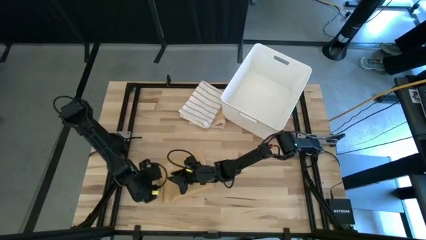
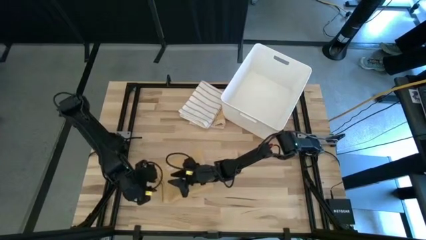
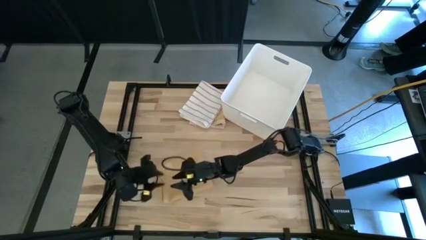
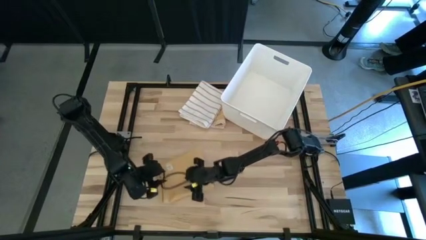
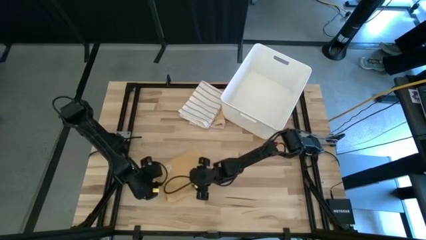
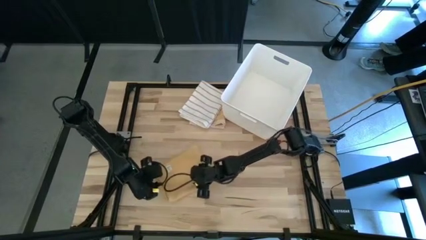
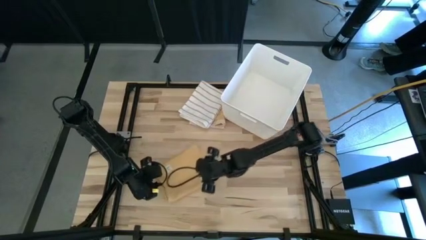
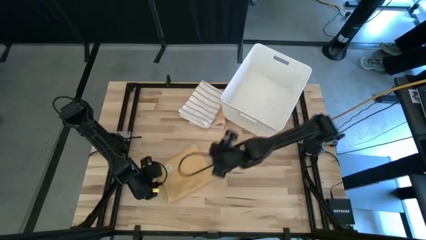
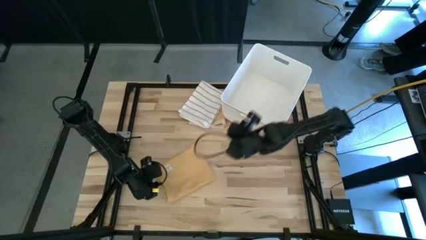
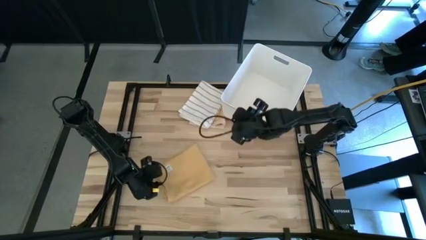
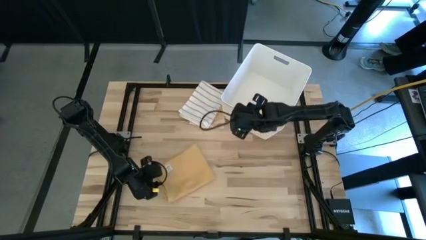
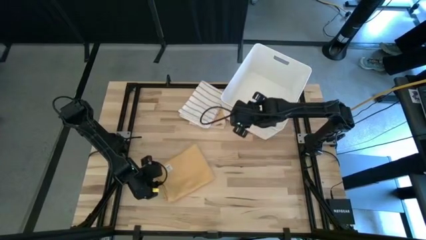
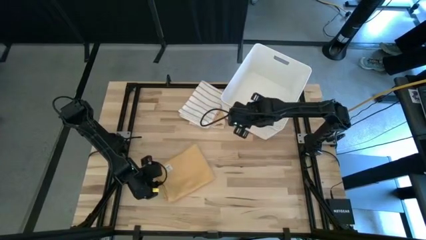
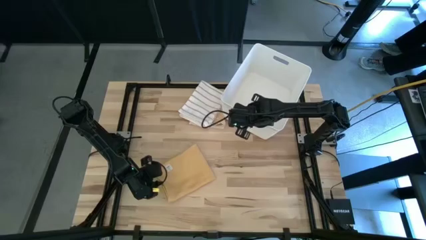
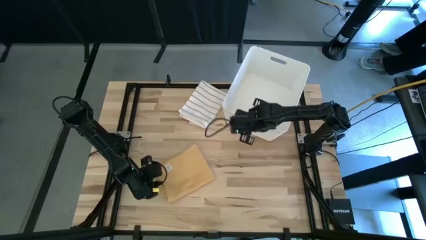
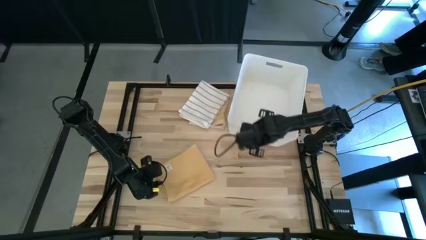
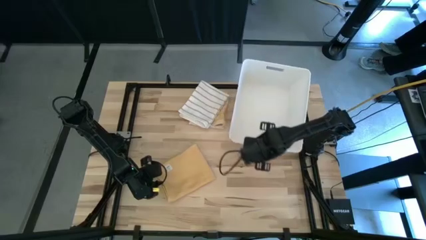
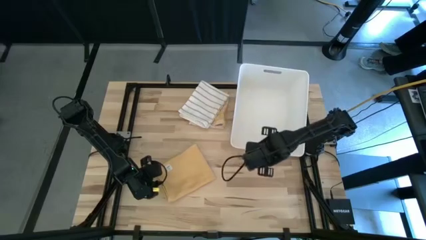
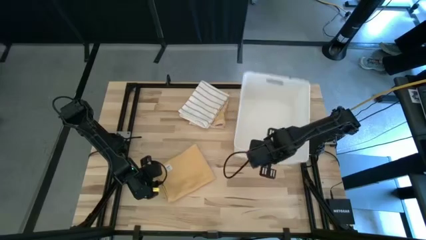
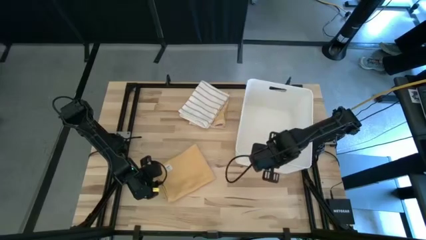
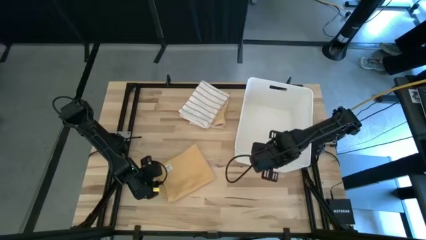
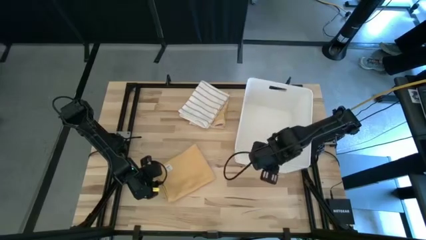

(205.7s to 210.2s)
Task: Fold towel
Move the white laundry organizer to the right of the table

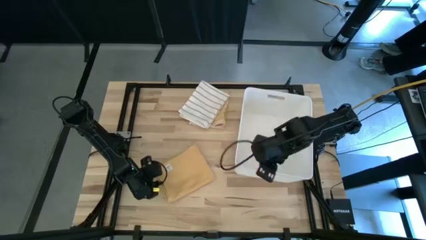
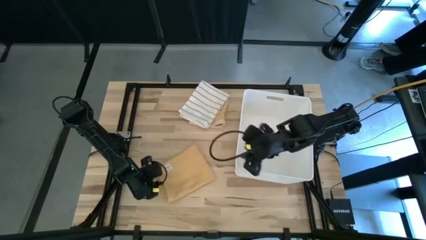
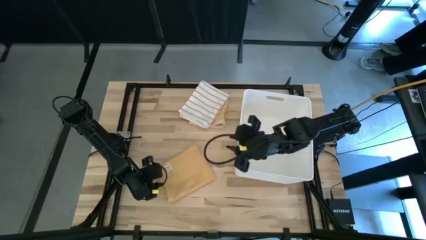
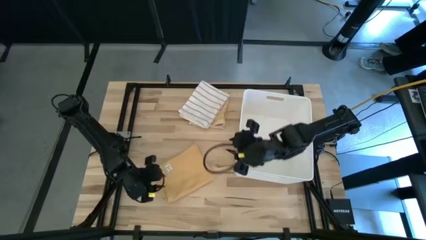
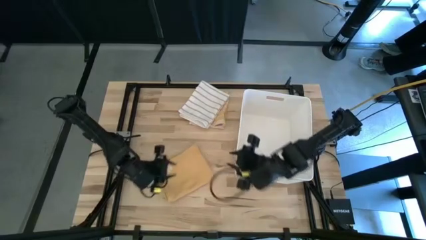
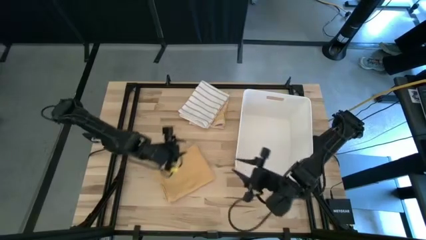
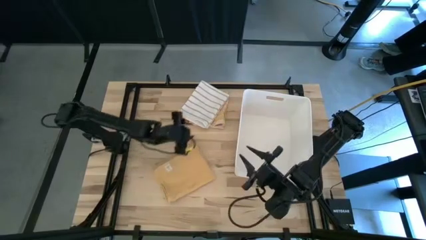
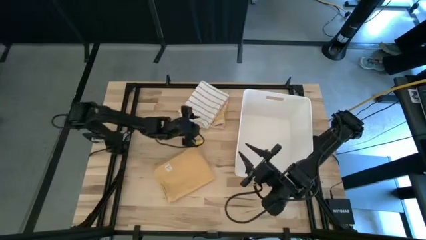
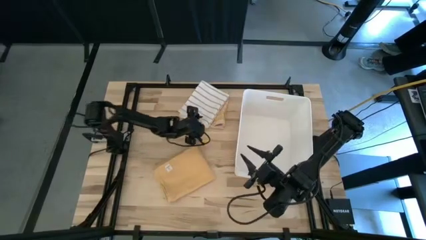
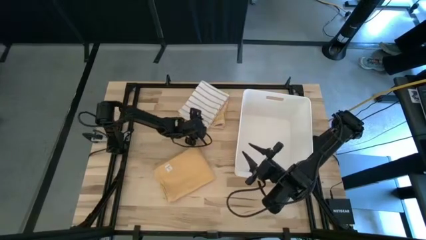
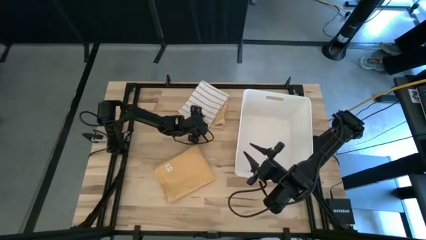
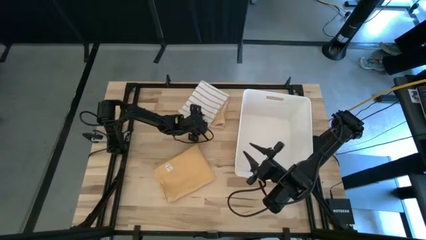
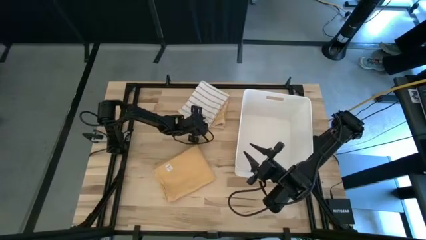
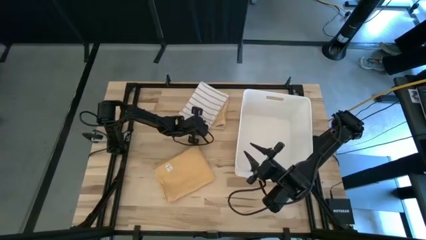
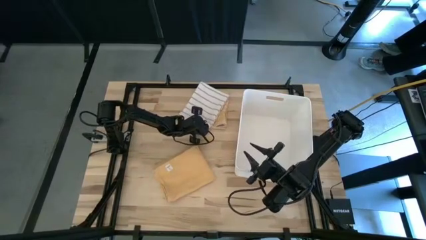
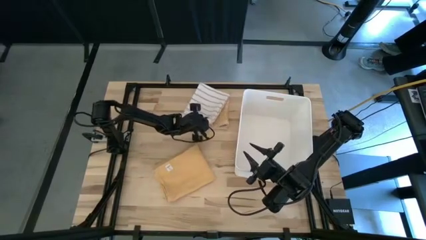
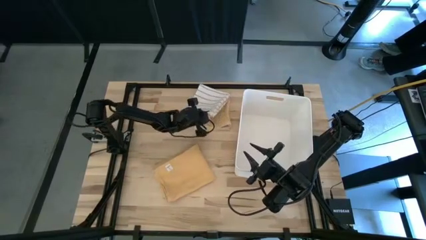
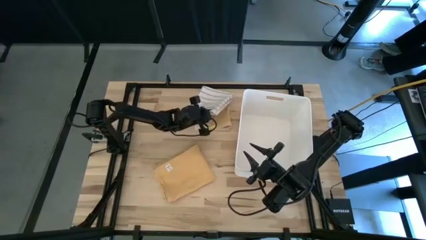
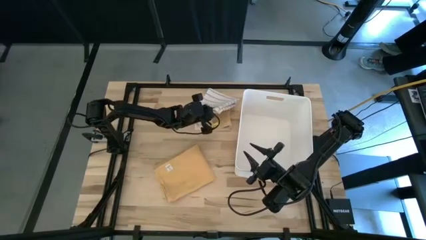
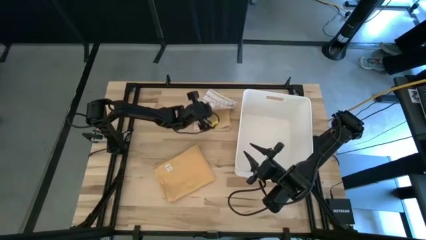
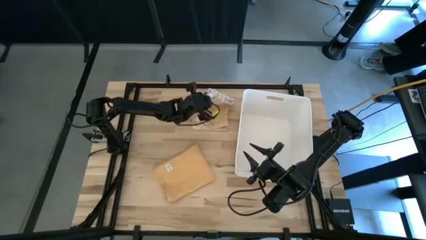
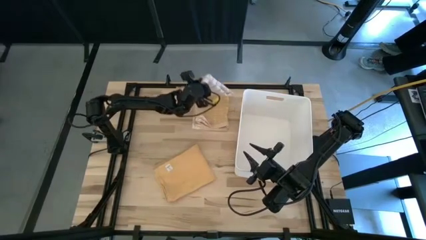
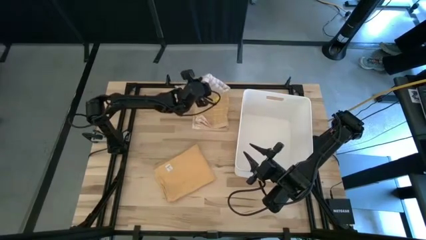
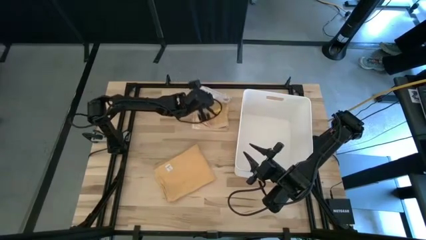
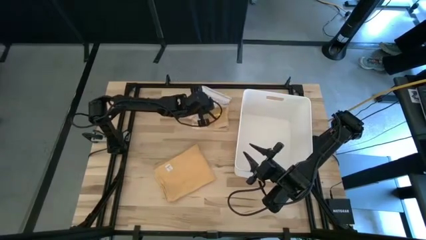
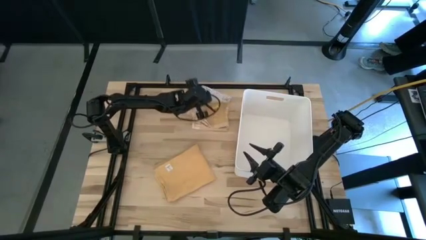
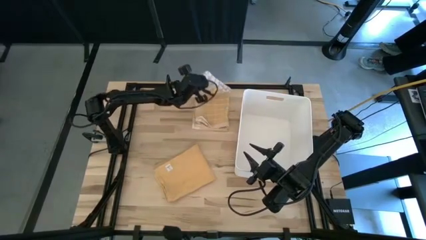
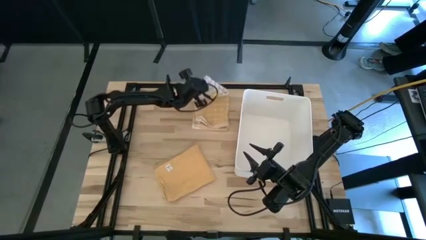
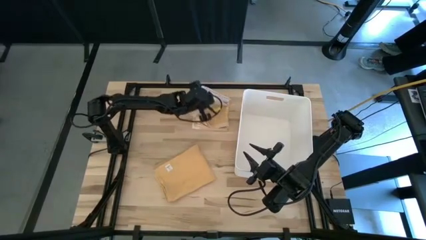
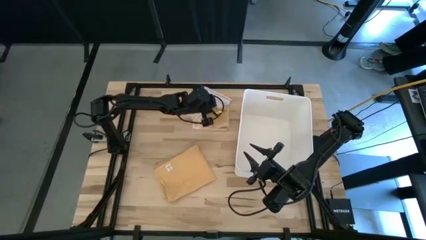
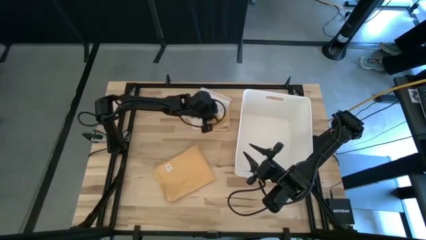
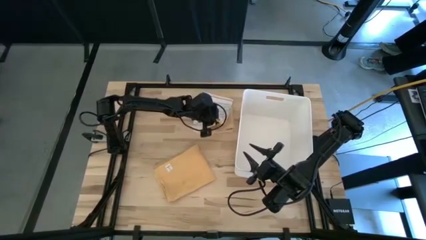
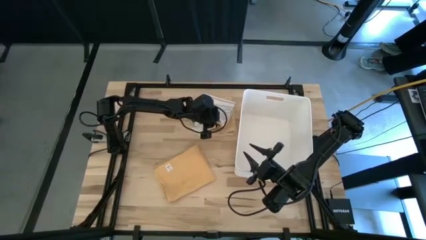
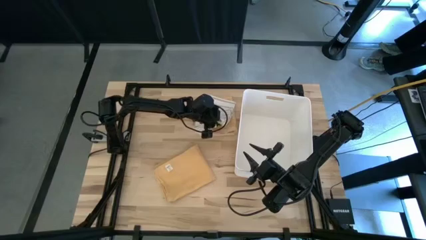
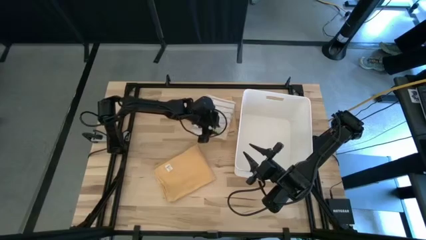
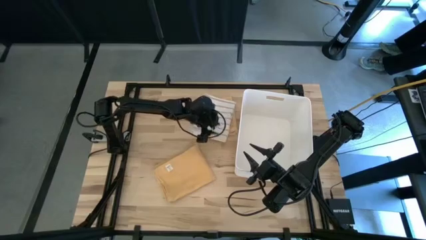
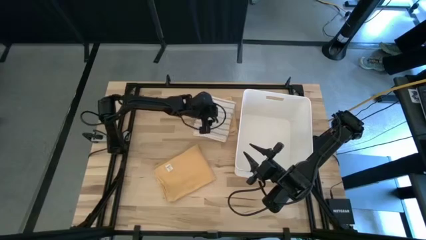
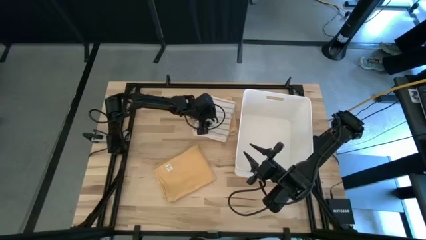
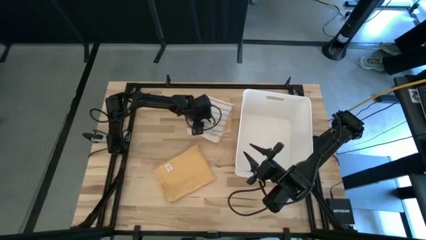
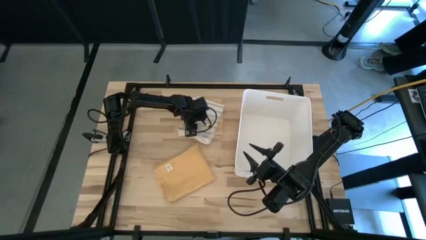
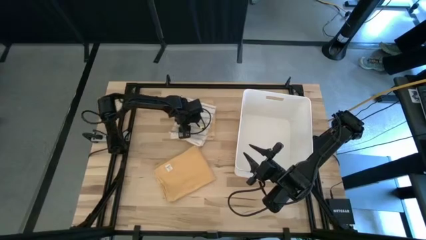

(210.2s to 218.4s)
Adjust the white towel

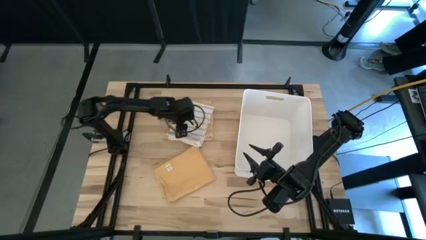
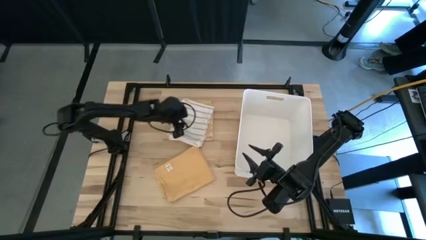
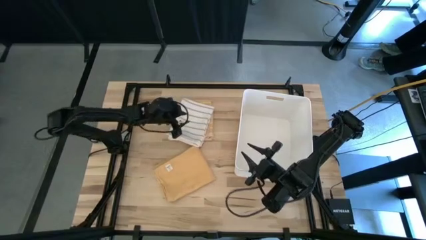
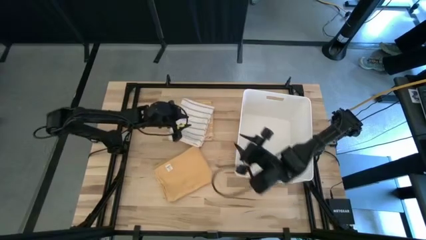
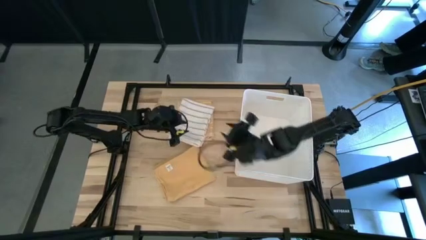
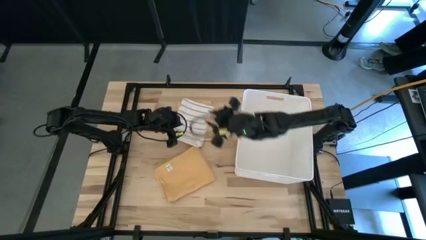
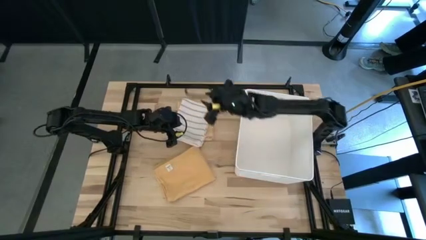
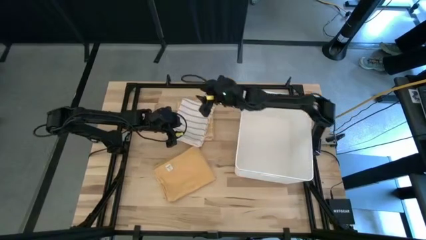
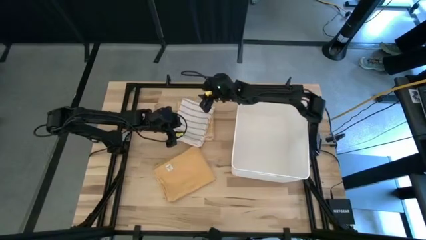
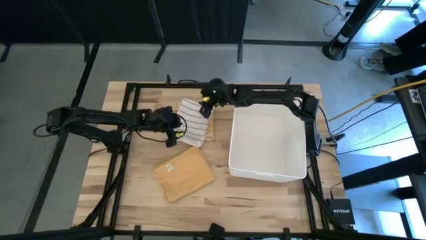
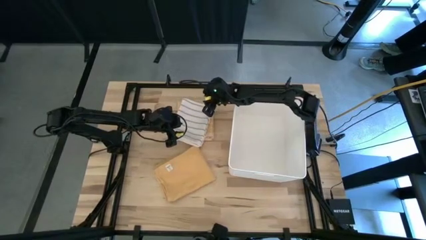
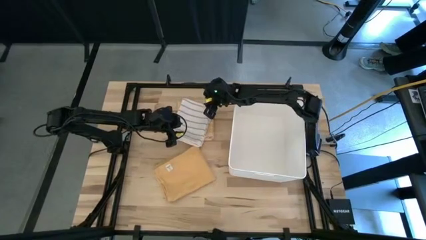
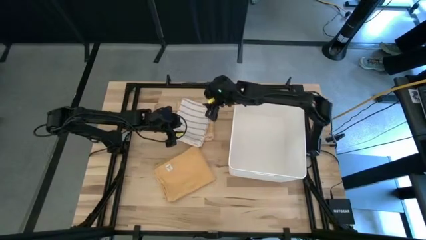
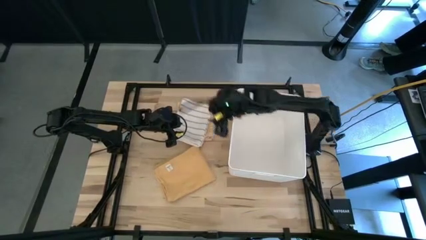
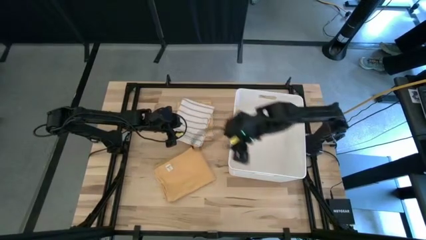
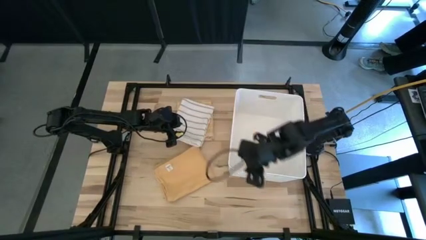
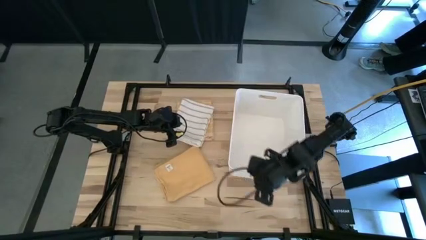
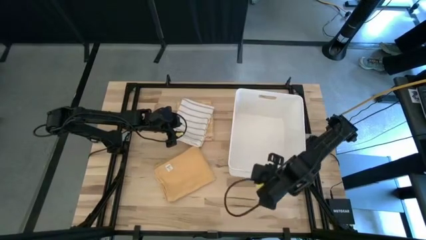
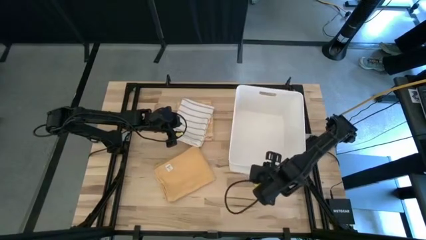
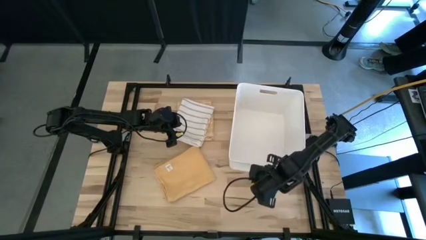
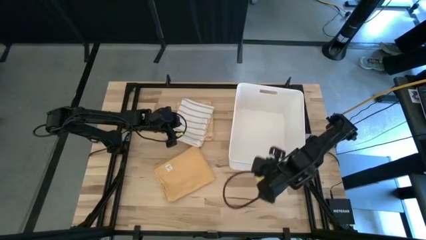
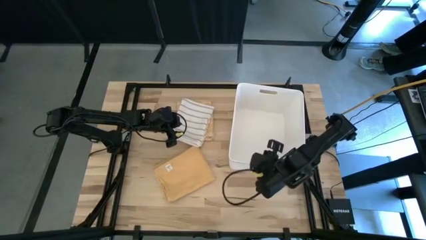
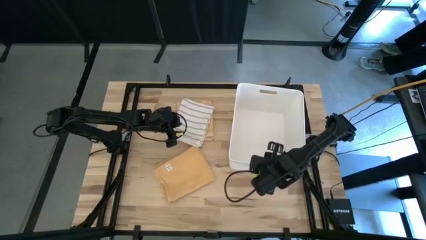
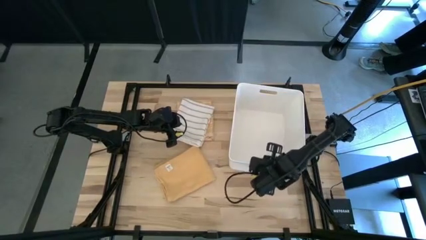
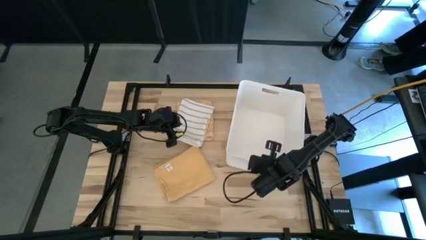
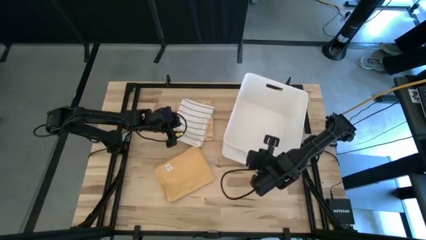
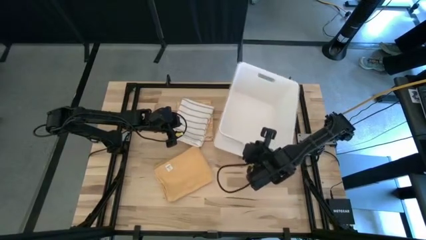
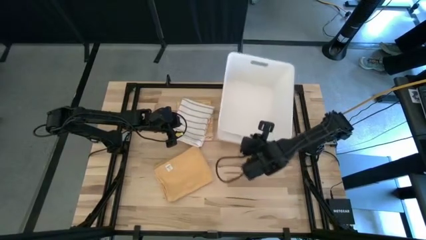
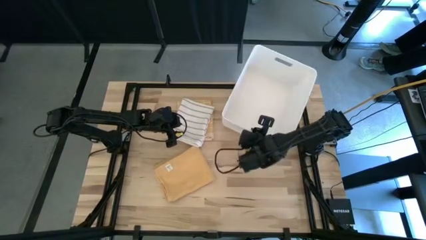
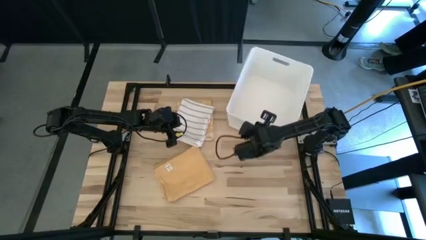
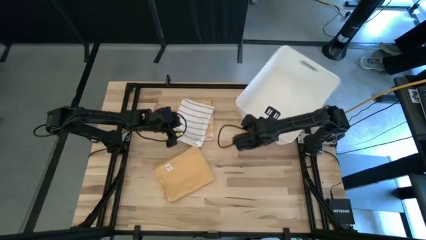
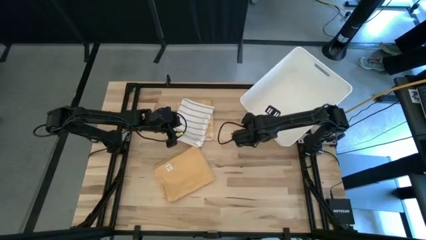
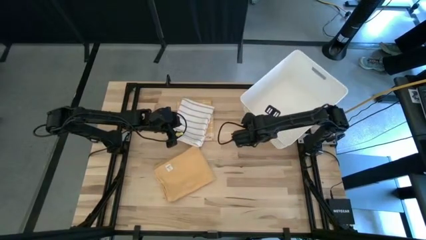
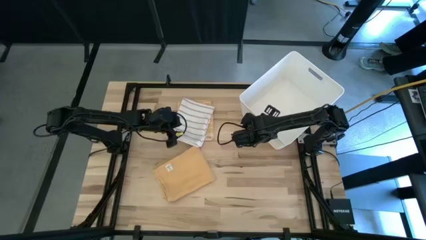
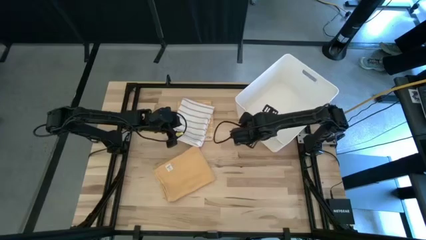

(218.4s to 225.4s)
Move the white laundry bin to the top of the table
